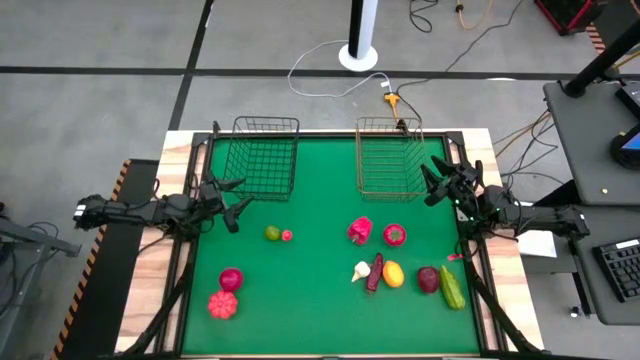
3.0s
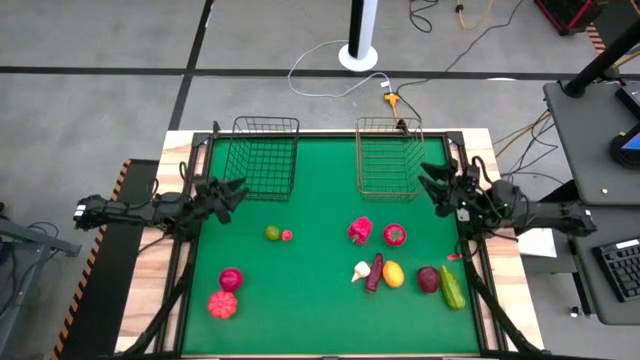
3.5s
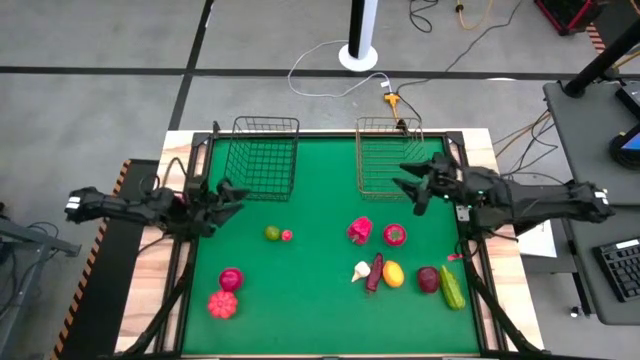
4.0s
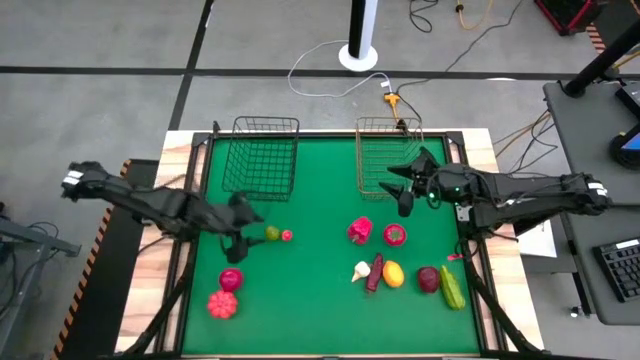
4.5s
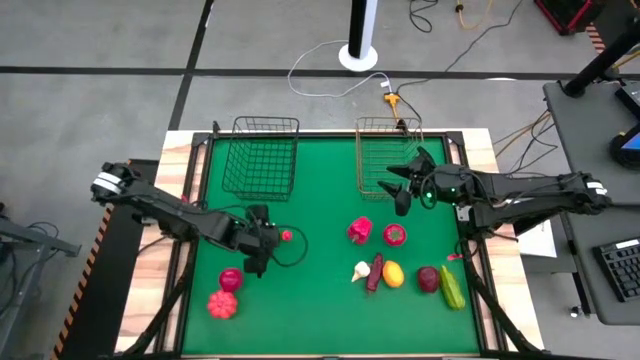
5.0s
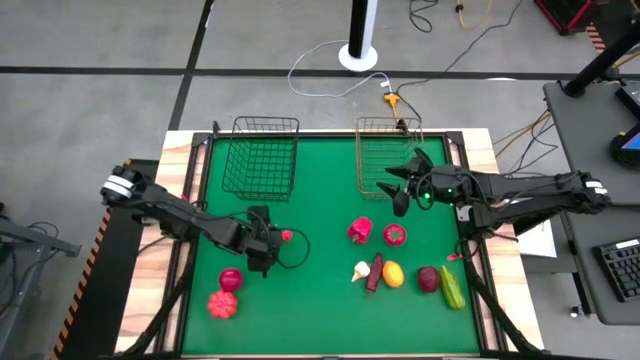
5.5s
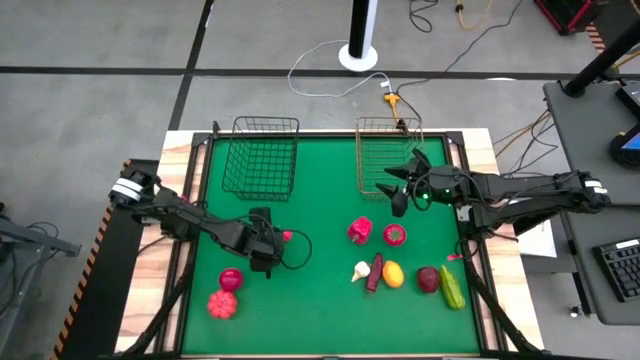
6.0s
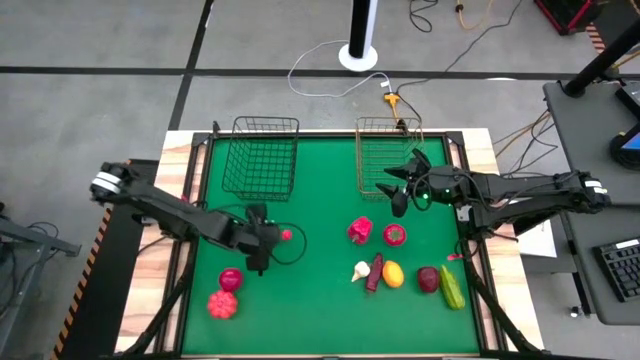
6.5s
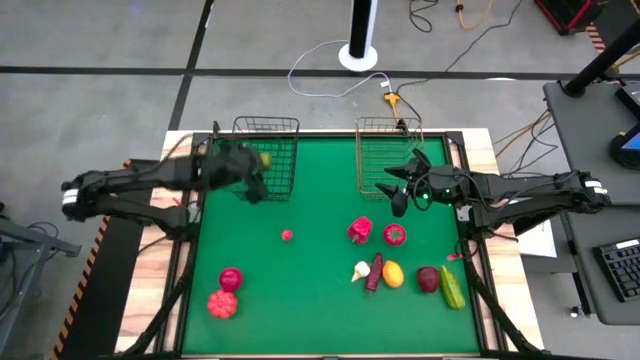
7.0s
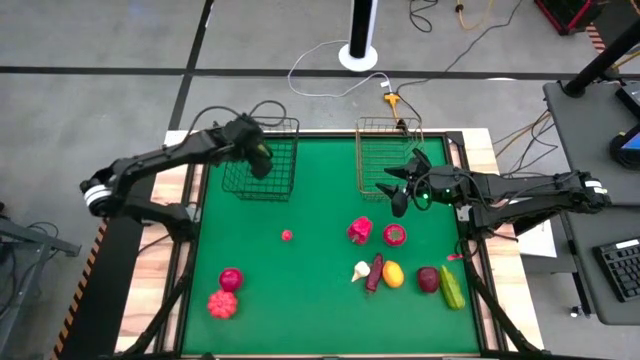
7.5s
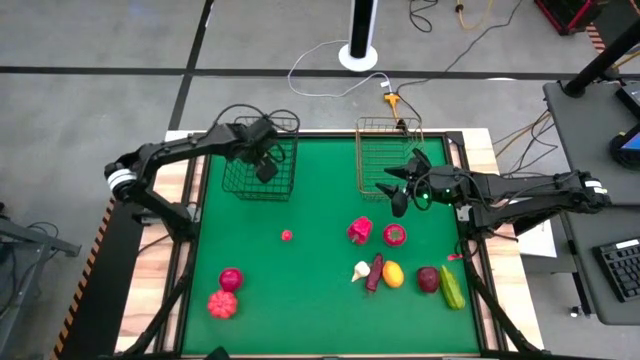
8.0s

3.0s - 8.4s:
Task: Sort produce into baskets
Put the lime into the black wire basket

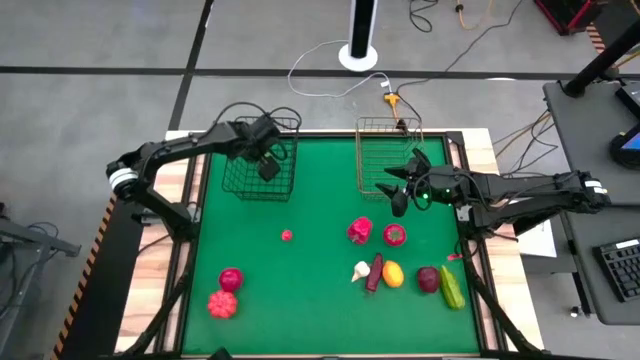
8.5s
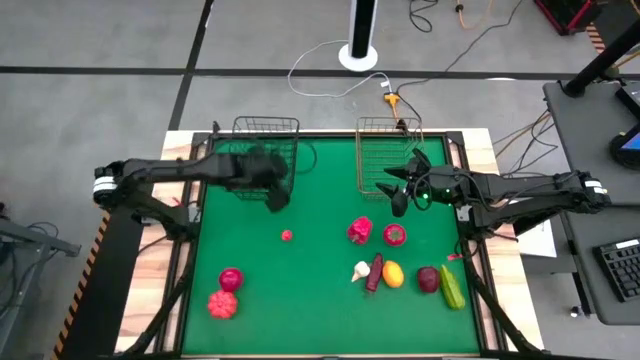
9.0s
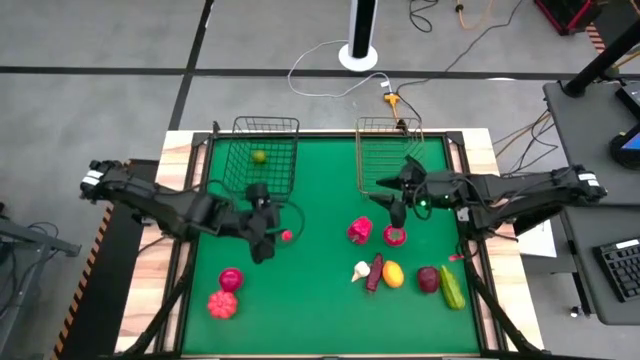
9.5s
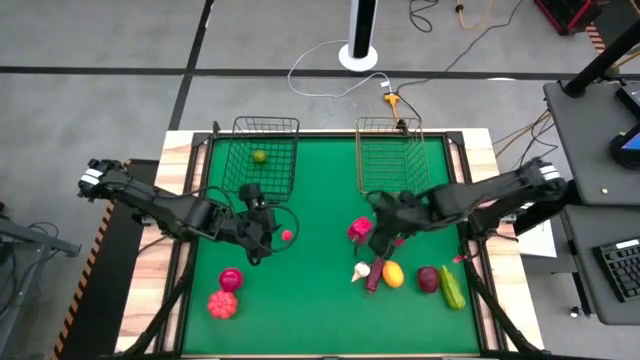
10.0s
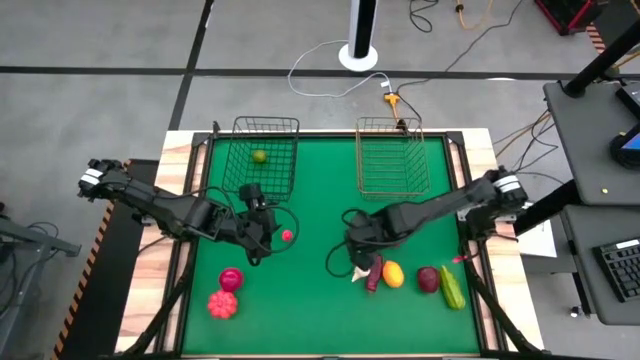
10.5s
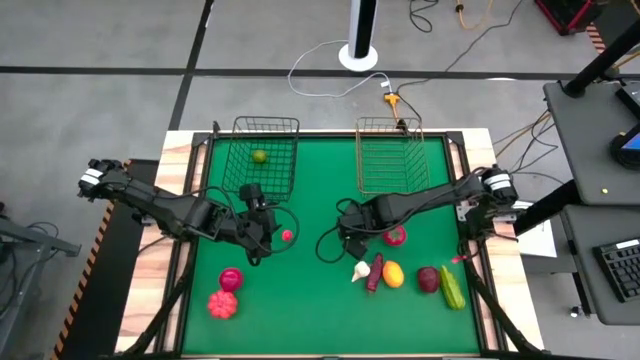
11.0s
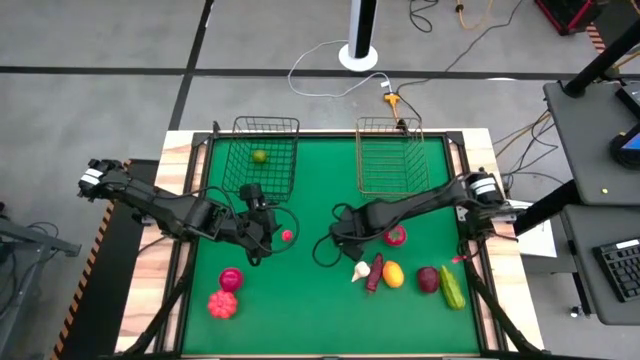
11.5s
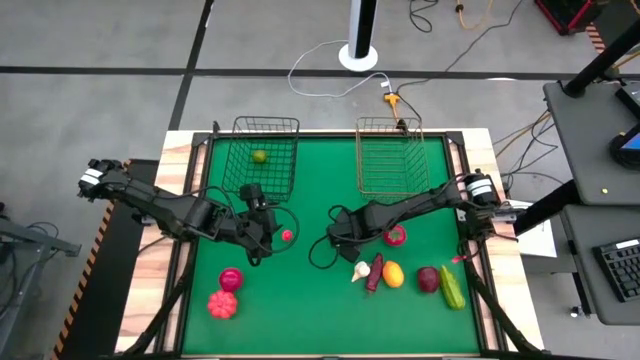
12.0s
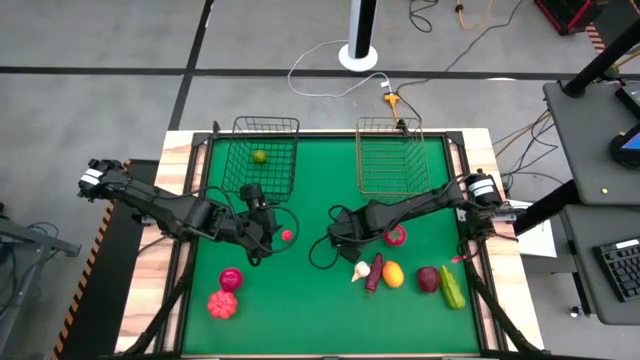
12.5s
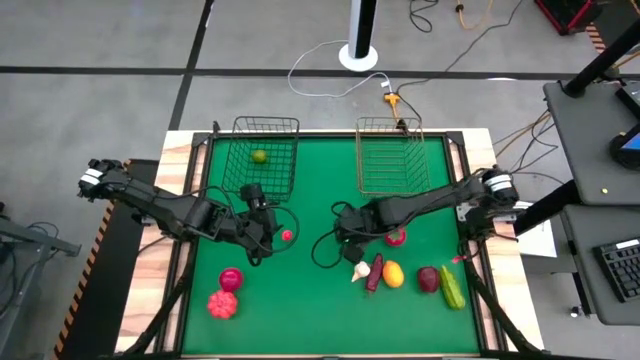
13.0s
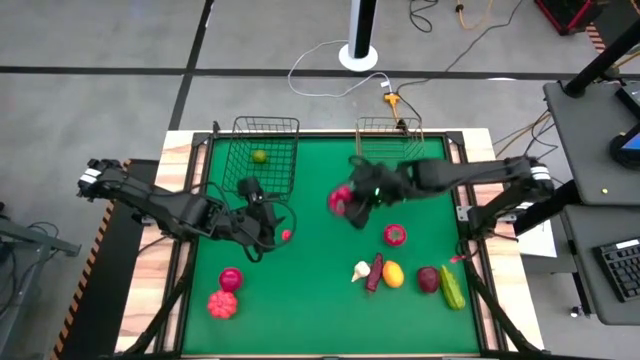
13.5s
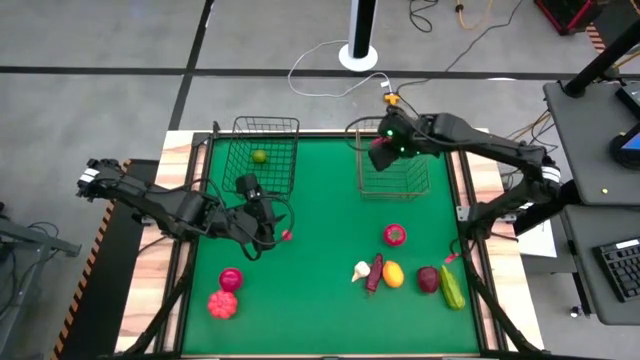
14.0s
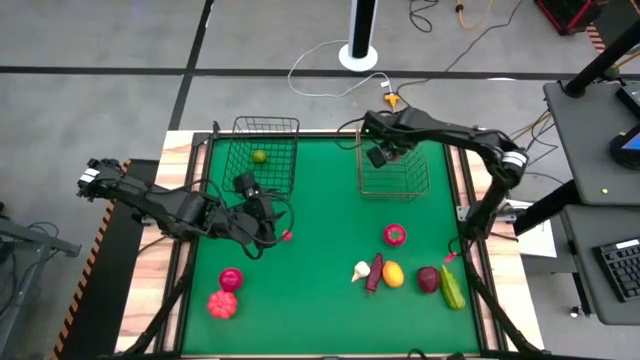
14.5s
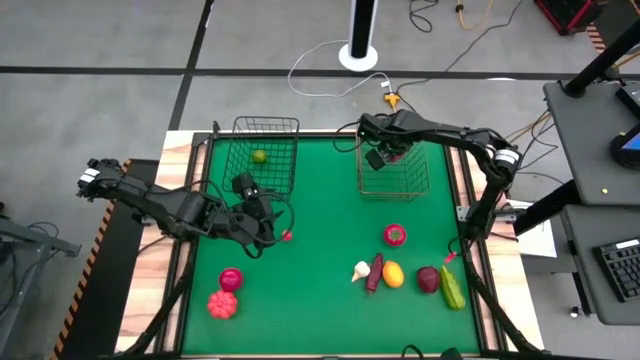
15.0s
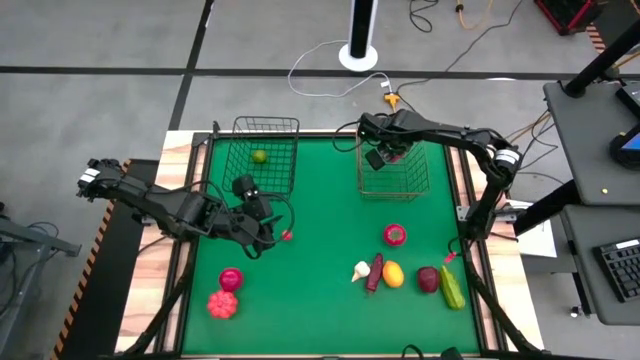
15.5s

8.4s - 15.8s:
Put the bell pepper into the gold wire basket

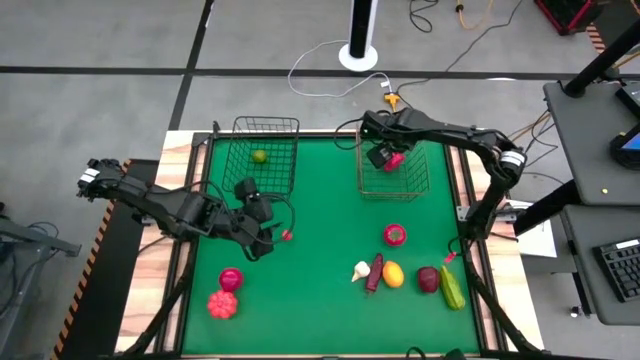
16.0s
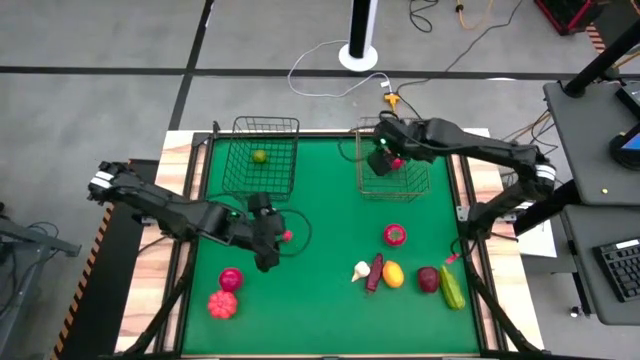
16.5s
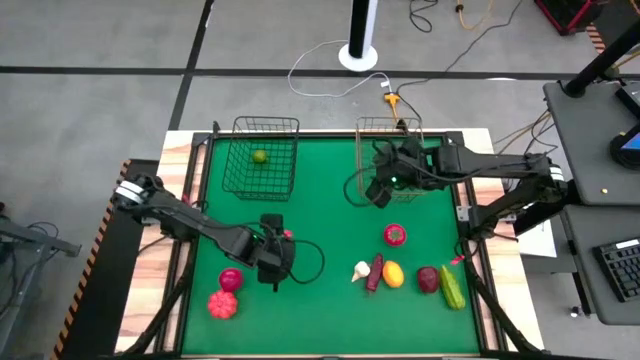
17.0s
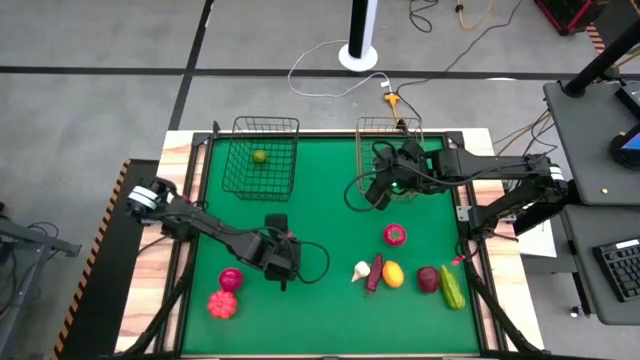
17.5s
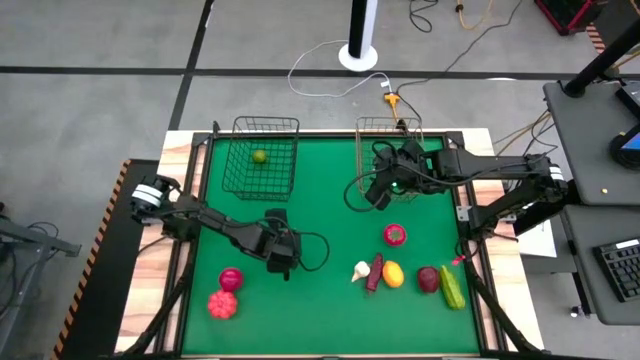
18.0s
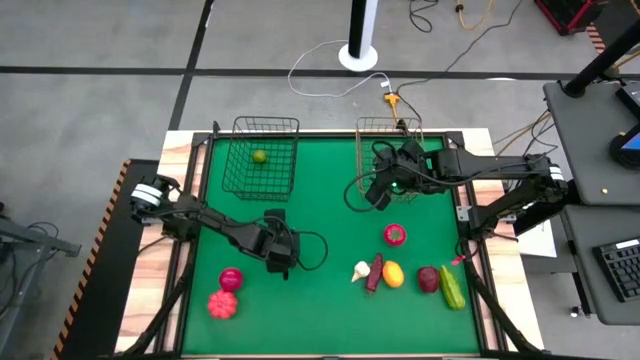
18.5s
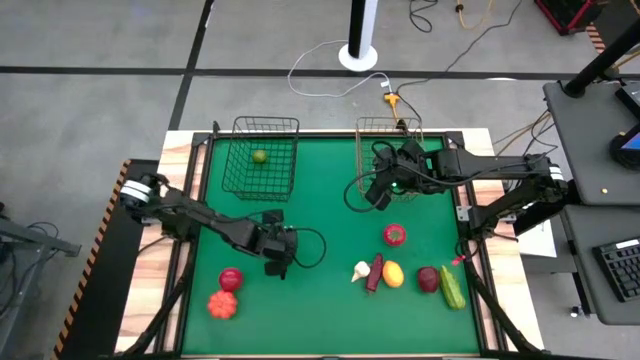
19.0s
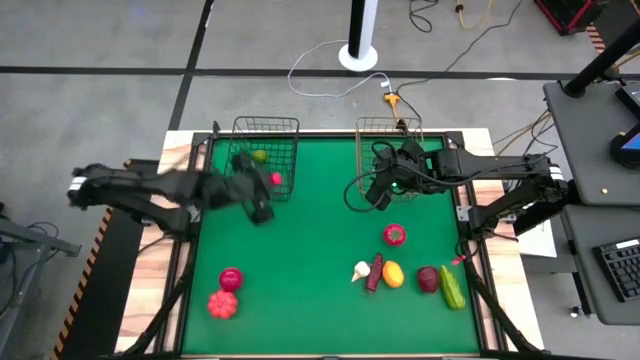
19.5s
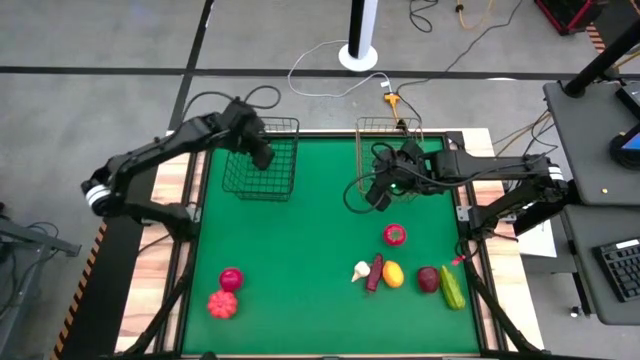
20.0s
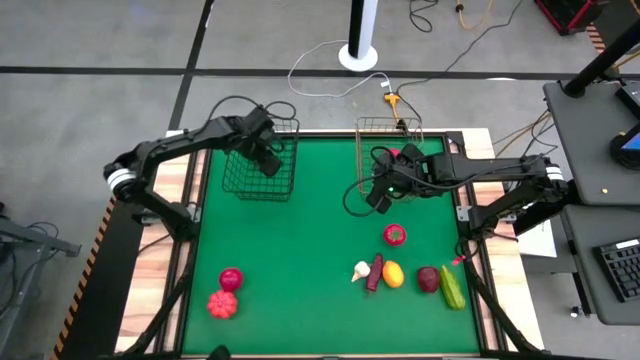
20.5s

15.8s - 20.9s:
Put the persimmon into the black wire basket

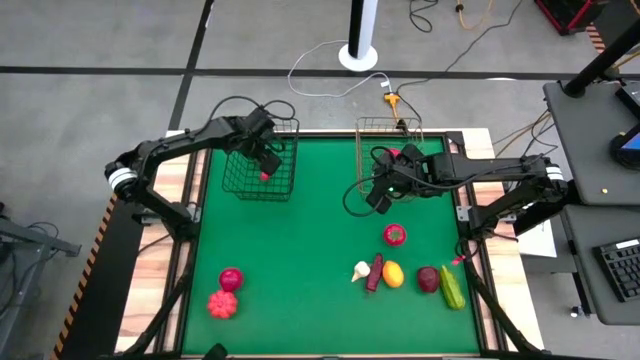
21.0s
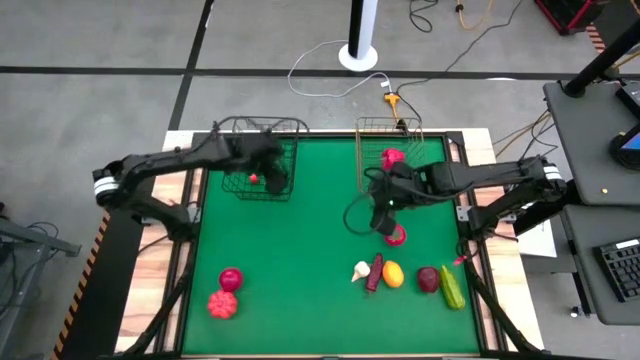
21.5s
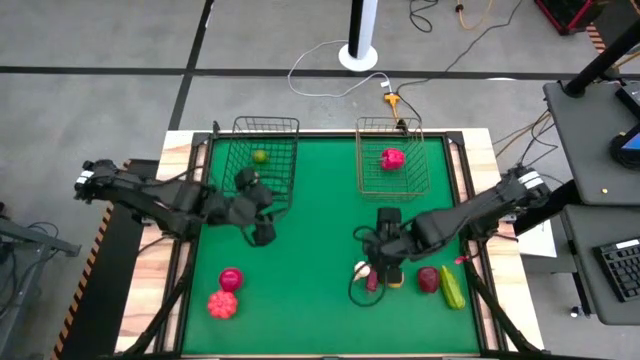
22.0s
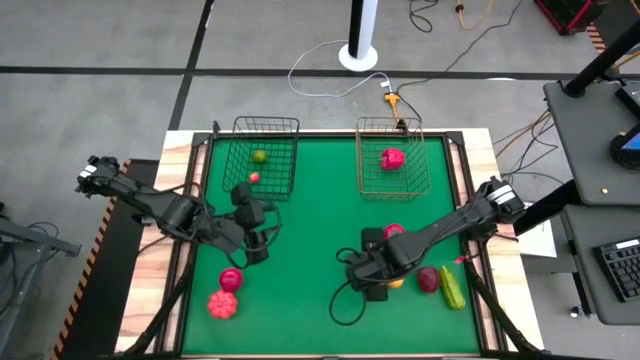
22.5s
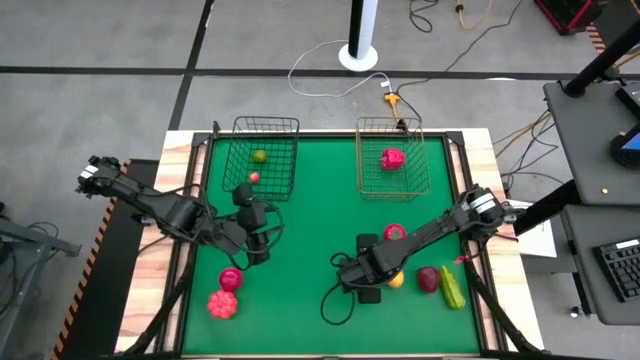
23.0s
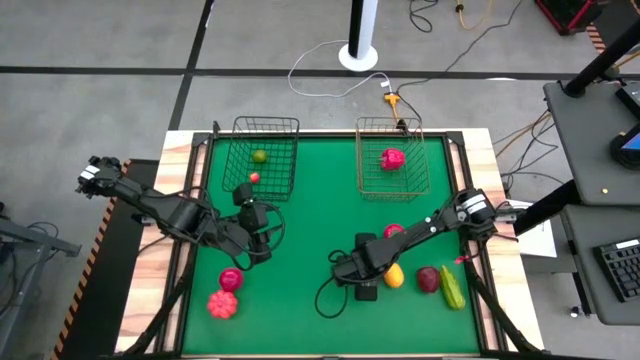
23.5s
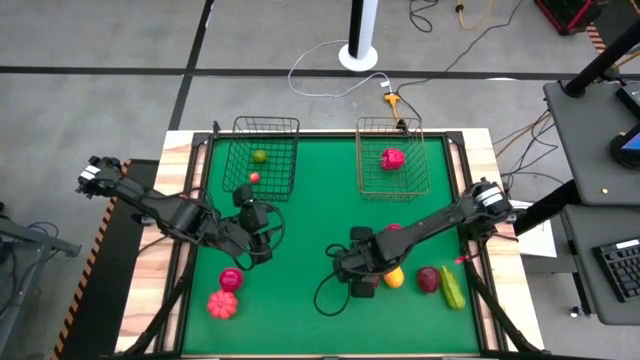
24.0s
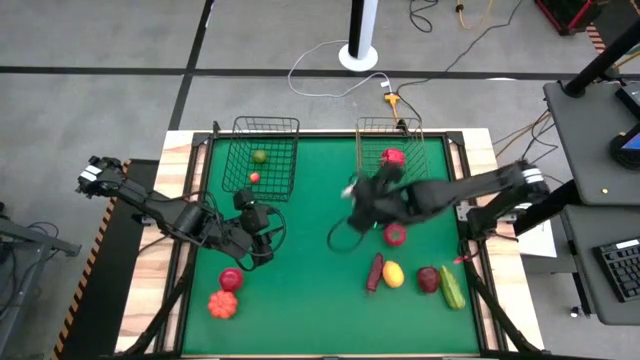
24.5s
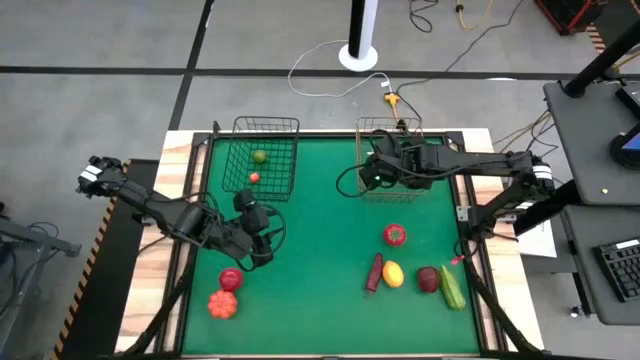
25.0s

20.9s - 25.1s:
Put the garlic into the gold wire basket
